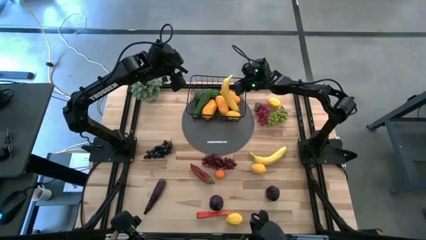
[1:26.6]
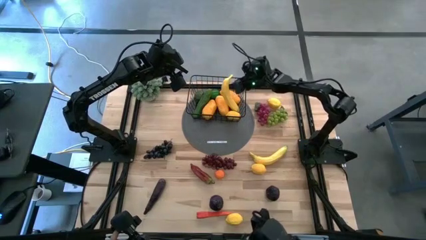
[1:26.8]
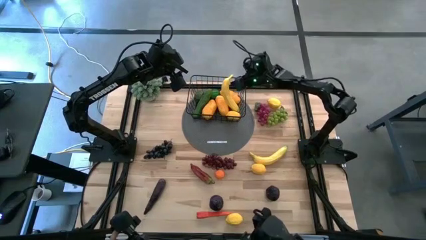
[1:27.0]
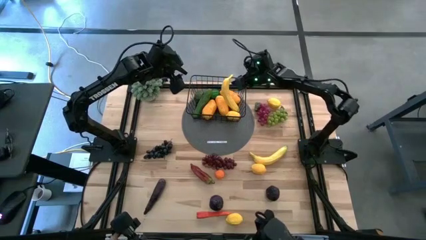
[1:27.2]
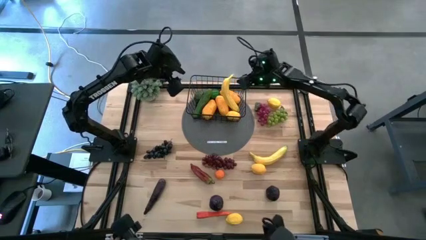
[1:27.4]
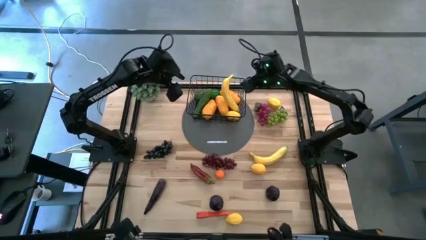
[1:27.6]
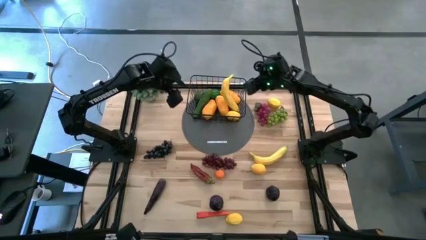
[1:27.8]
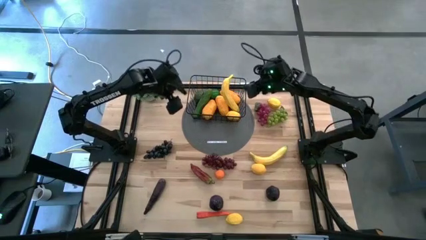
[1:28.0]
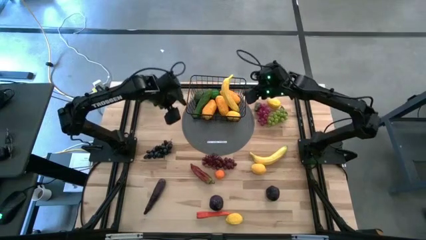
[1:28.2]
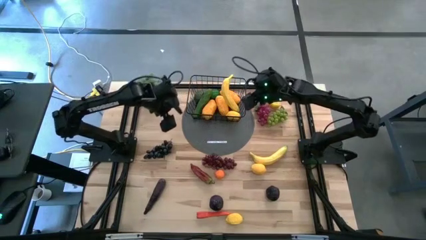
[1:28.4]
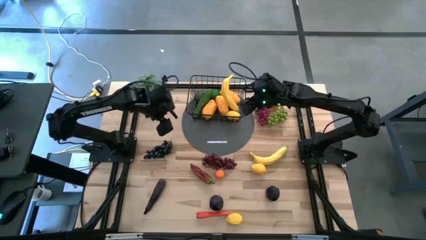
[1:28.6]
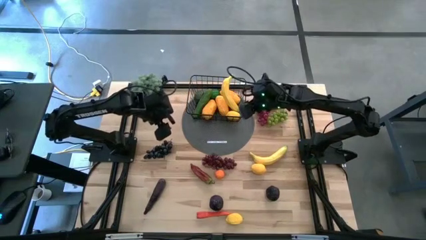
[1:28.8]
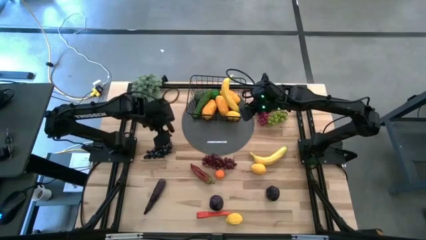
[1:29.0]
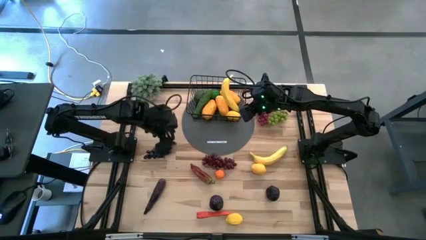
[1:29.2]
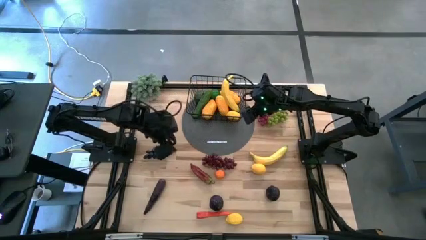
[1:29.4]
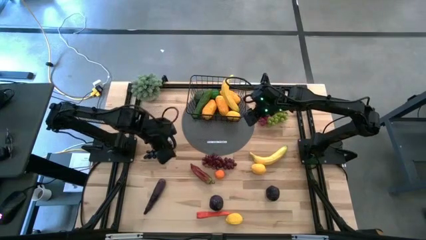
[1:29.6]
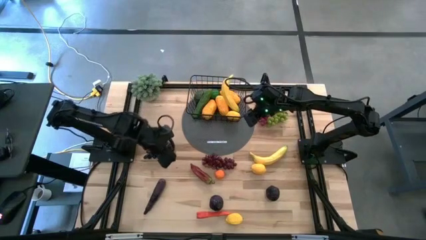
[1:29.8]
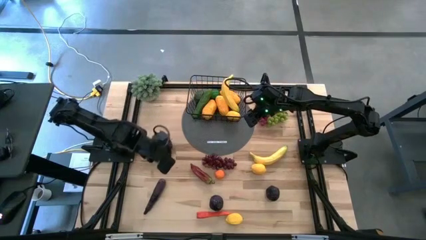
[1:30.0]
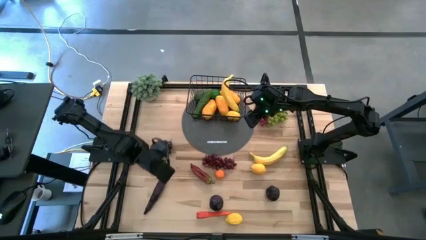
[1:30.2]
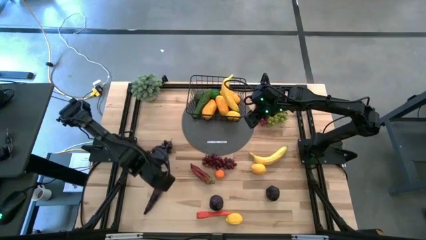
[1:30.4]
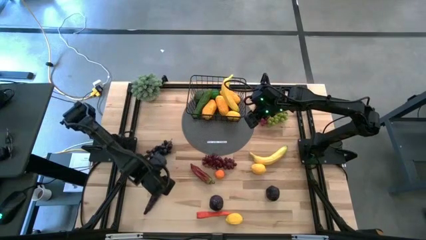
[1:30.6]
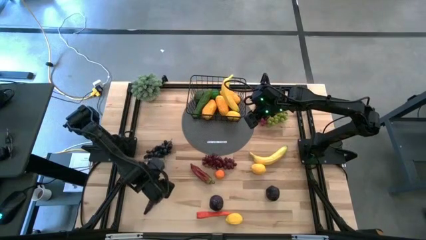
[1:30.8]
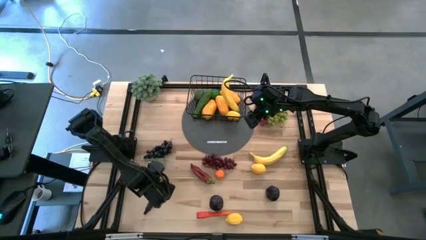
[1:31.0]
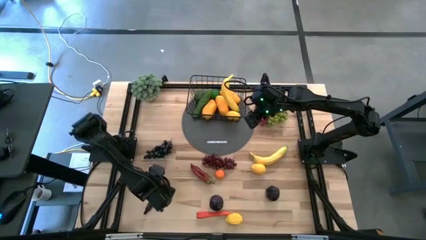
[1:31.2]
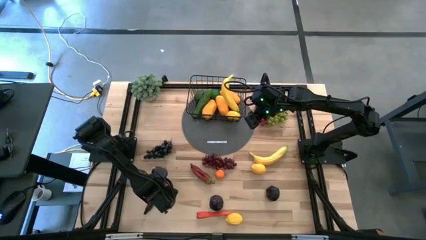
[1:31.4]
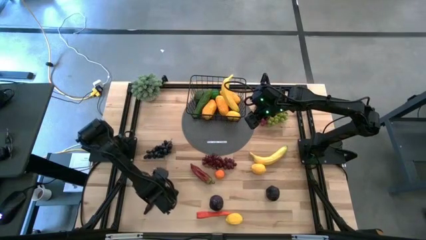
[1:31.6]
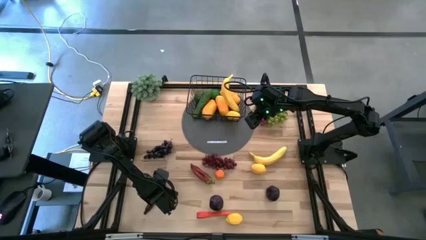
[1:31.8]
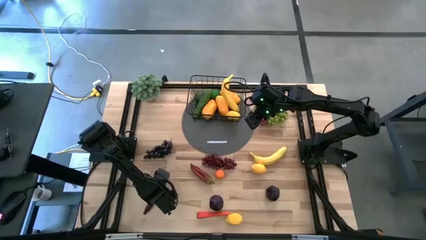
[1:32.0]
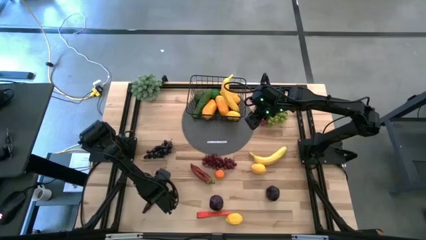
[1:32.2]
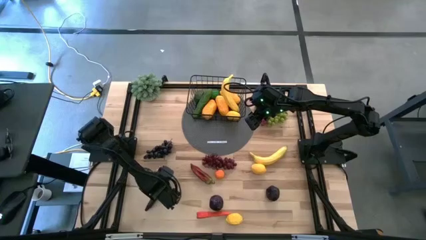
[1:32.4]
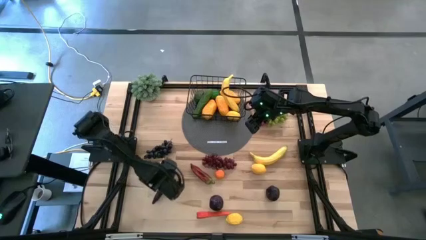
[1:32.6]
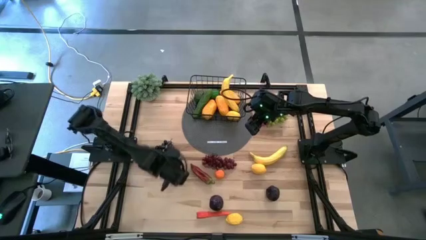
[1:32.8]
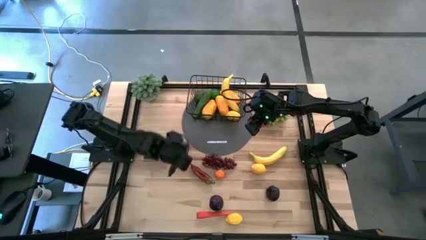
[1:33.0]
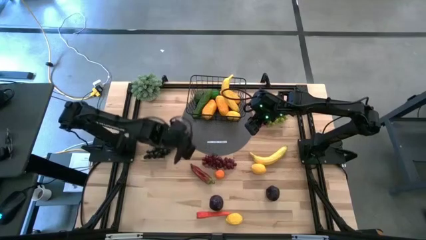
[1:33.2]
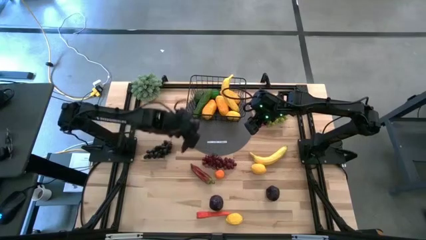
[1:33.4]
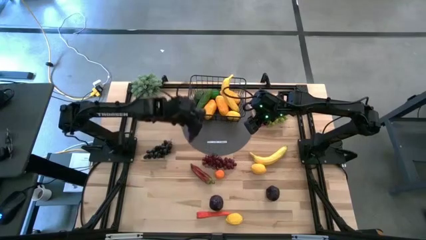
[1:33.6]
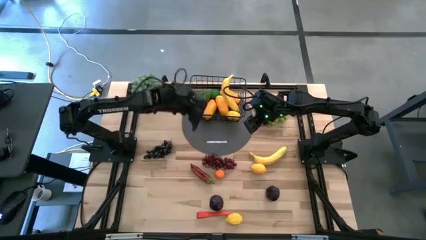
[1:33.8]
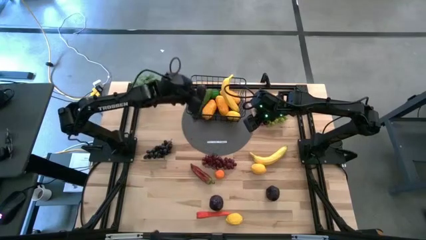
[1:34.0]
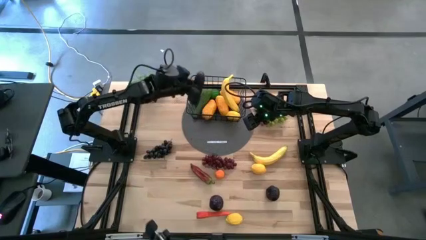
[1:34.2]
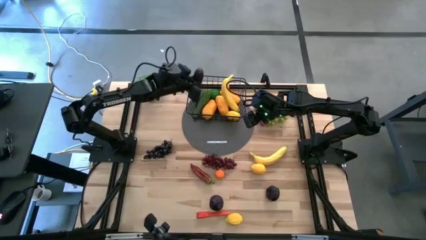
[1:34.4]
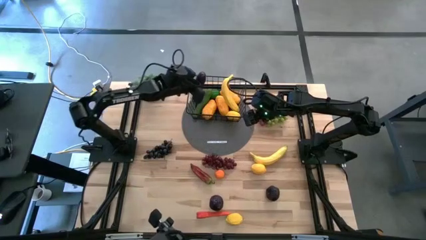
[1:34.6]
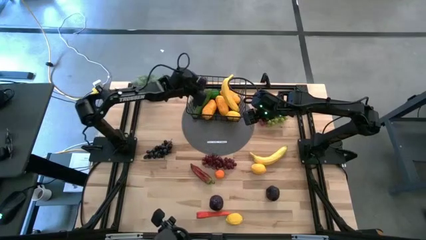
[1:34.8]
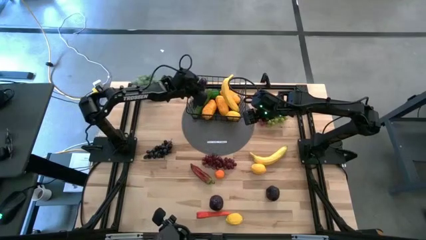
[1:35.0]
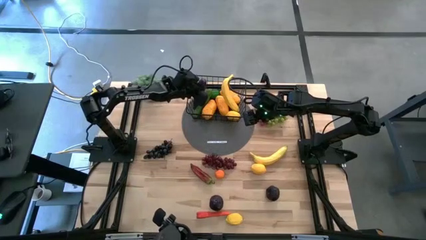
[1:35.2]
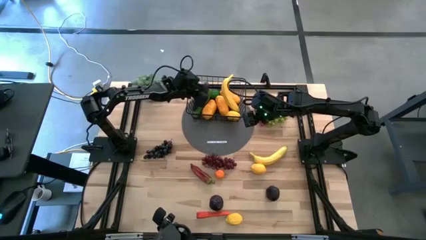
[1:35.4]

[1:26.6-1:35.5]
Task: Build produce basket
Put the purple eggplant into the black wire basket

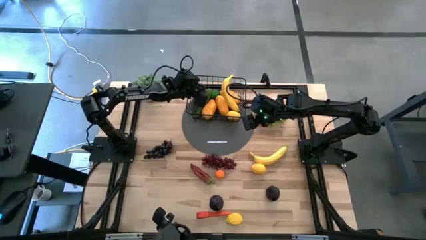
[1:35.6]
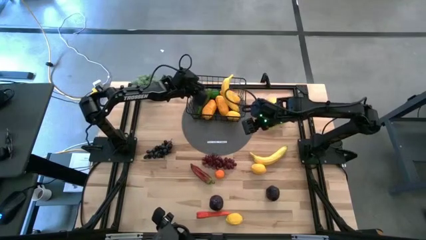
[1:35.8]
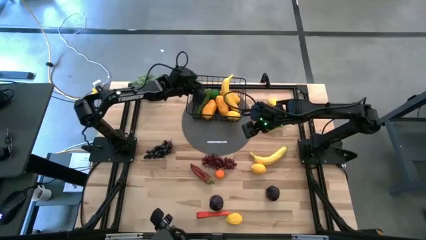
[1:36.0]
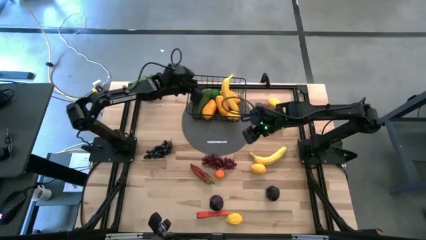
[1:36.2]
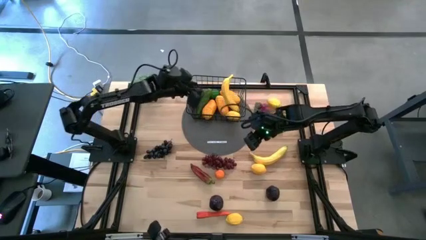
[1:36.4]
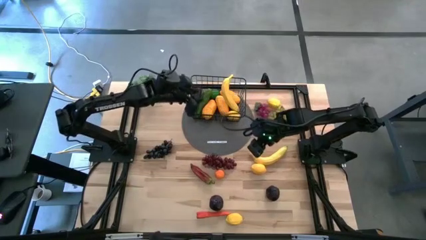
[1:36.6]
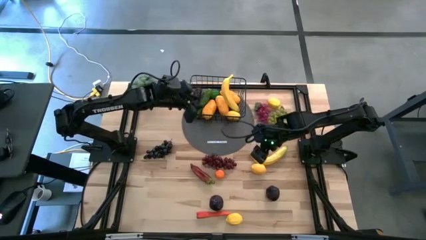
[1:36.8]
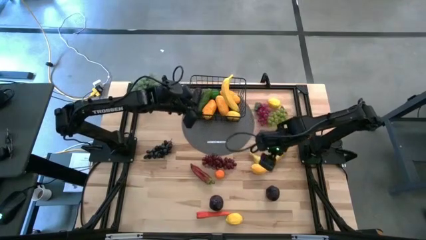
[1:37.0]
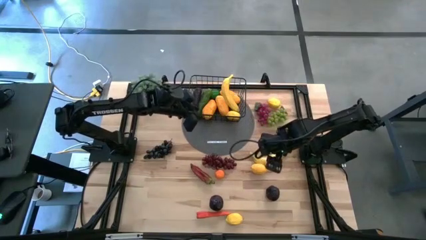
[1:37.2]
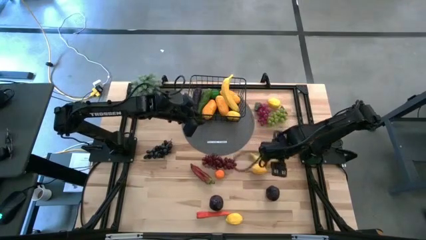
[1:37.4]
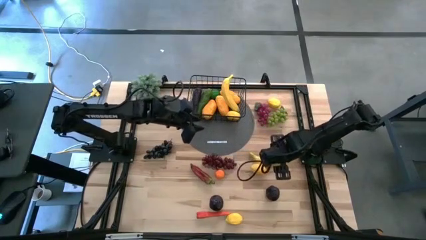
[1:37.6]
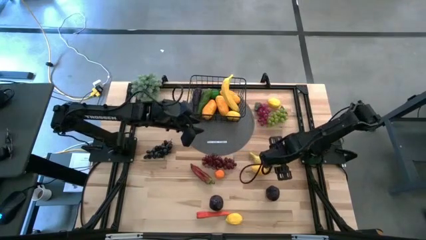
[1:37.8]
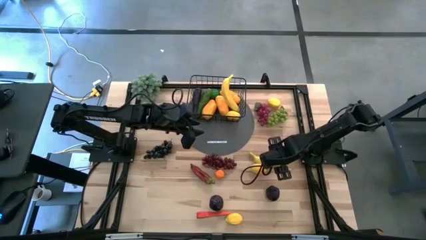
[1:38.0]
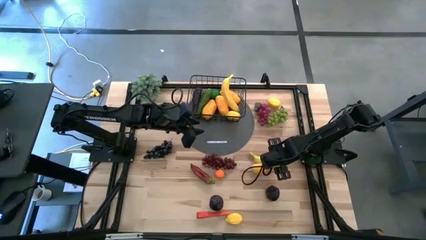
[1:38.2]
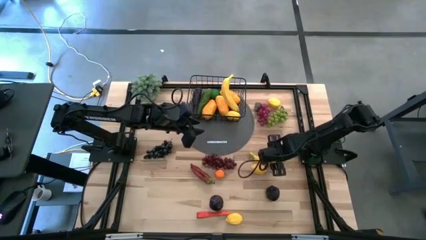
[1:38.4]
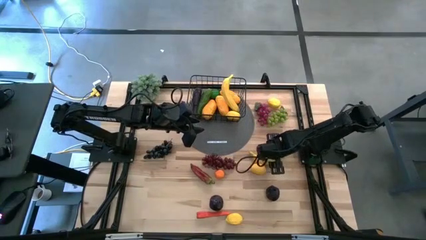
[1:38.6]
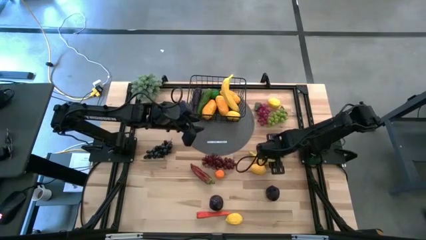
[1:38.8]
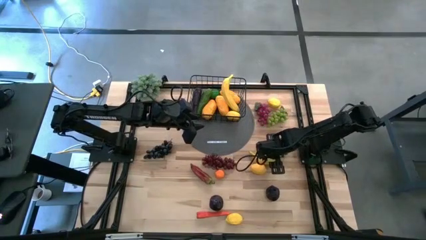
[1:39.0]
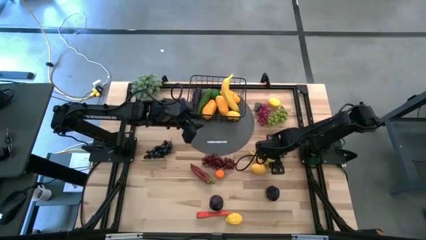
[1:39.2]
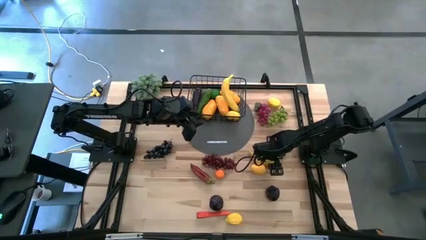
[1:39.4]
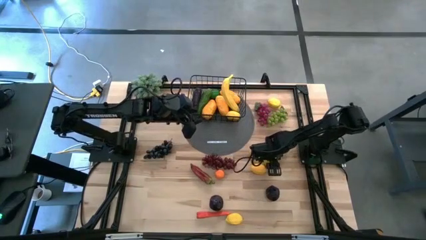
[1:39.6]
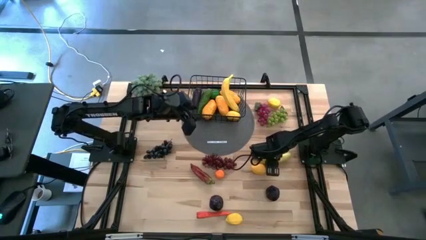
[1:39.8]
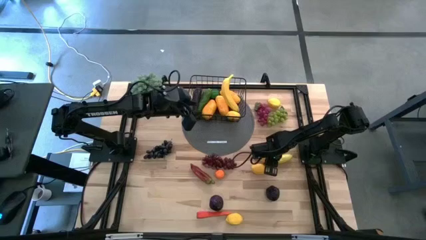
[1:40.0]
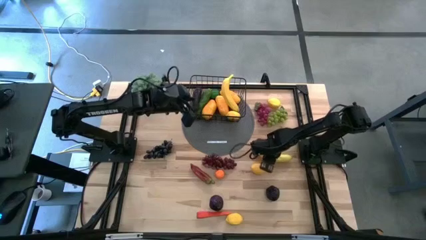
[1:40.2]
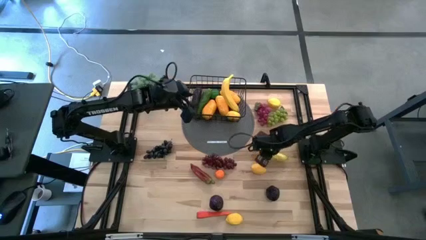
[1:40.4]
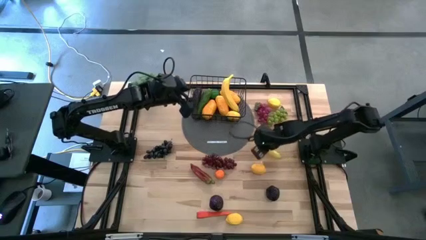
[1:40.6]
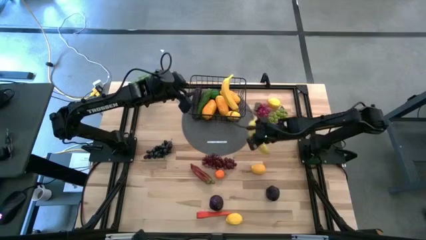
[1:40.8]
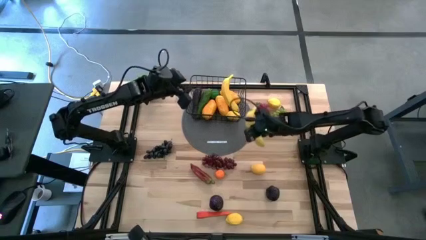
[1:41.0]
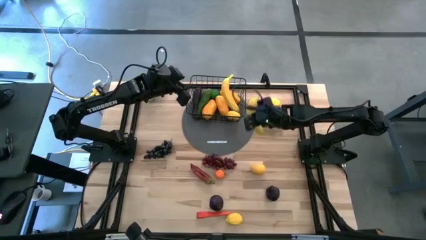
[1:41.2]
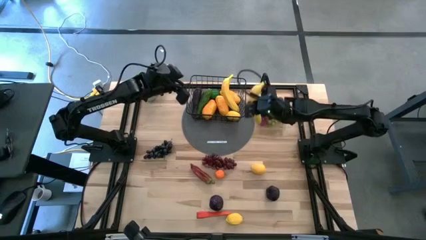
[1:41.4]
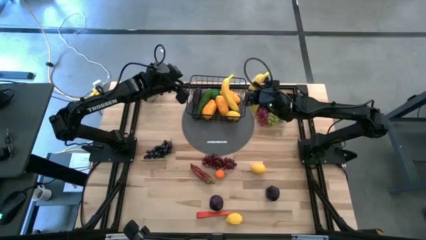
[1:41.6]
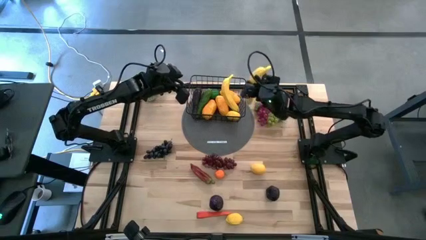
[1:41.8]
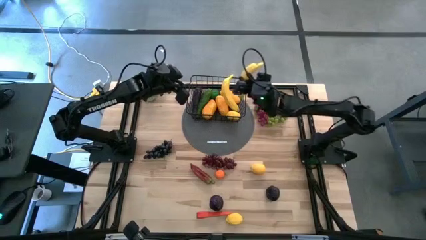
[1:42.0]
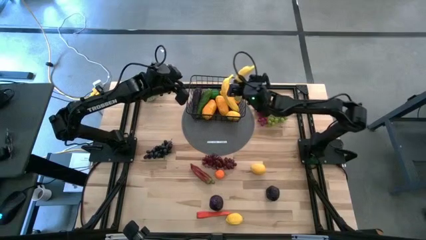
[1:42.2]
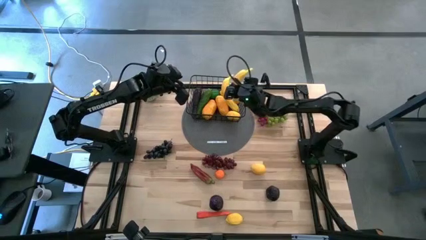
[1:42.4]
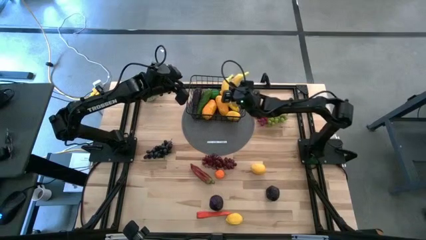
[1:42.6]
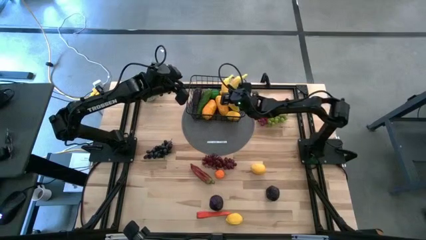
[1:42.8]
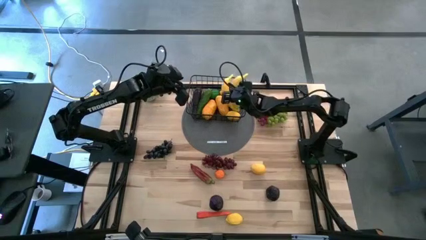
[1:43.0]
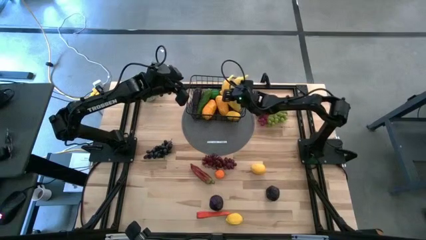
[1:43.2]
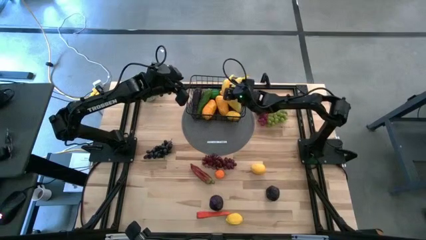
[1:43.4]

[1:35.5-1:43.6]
Put the yellow banana into the black wire basket
